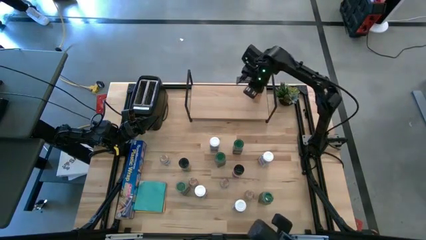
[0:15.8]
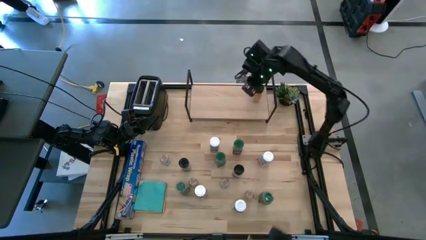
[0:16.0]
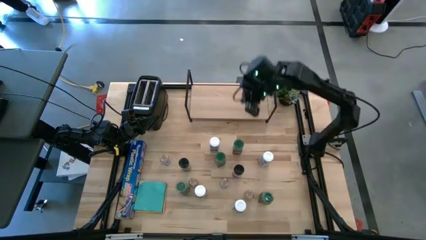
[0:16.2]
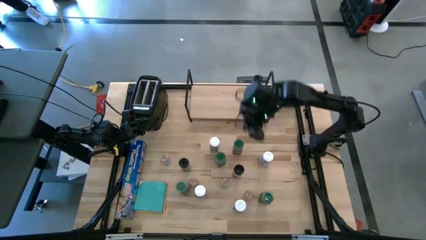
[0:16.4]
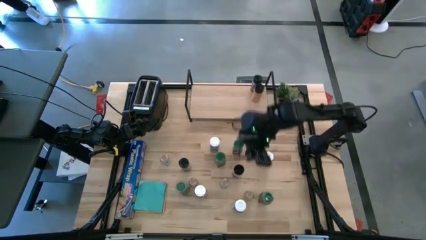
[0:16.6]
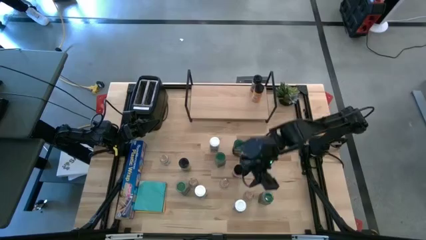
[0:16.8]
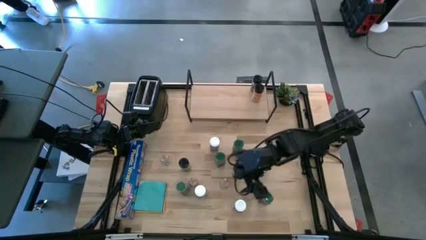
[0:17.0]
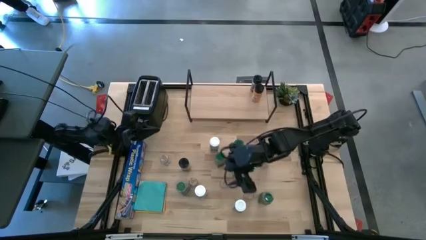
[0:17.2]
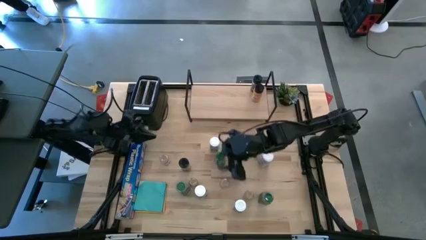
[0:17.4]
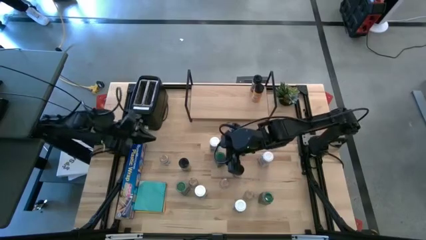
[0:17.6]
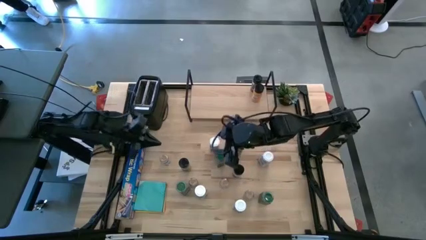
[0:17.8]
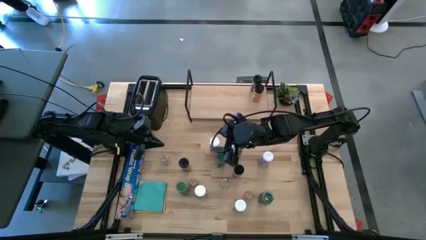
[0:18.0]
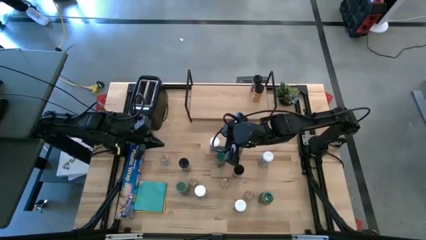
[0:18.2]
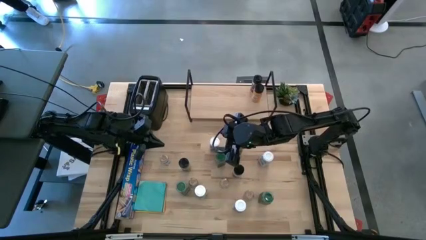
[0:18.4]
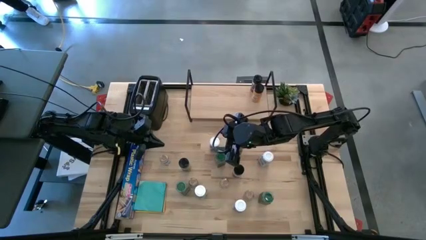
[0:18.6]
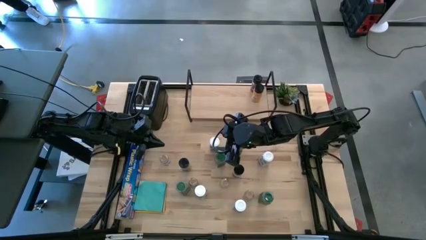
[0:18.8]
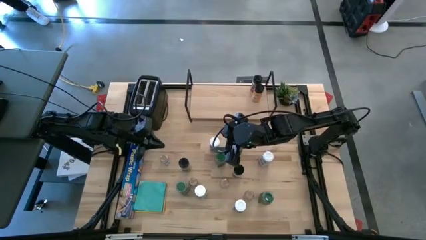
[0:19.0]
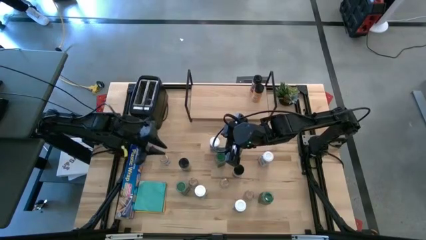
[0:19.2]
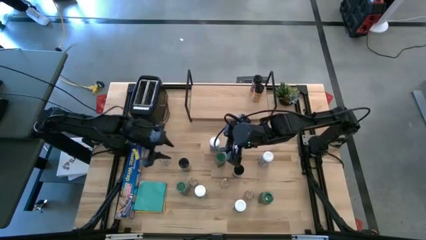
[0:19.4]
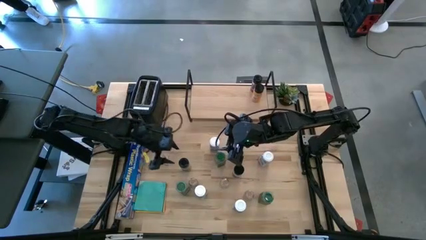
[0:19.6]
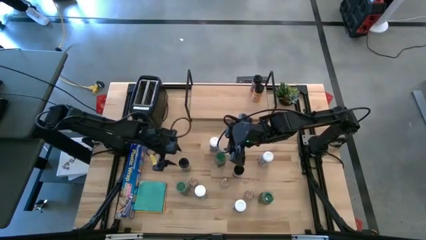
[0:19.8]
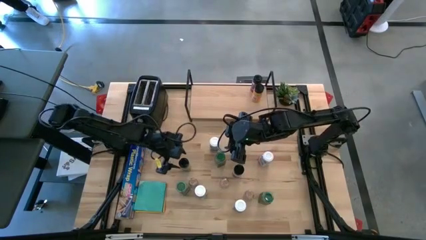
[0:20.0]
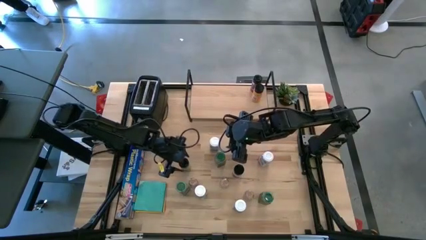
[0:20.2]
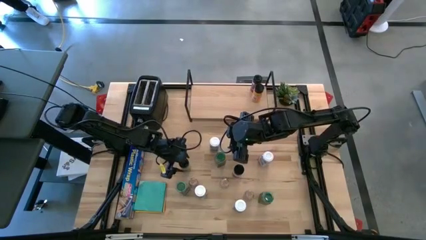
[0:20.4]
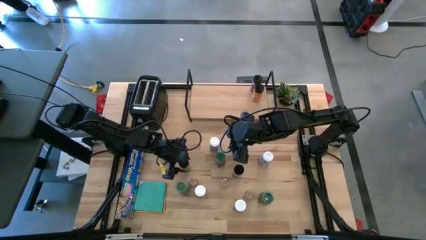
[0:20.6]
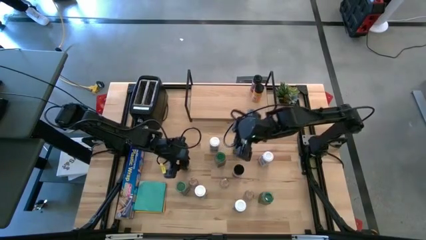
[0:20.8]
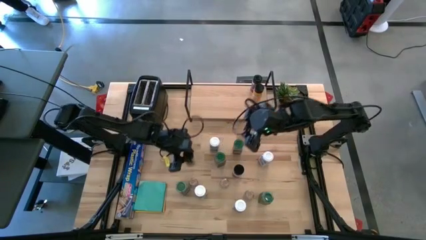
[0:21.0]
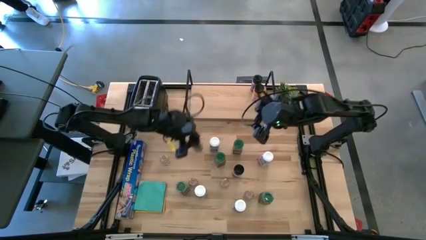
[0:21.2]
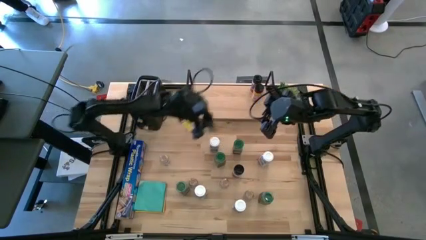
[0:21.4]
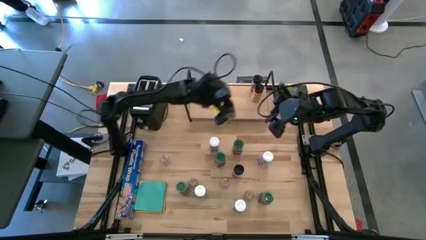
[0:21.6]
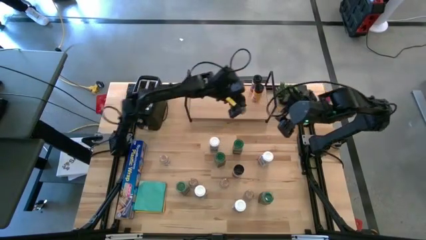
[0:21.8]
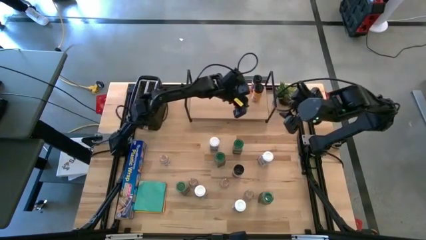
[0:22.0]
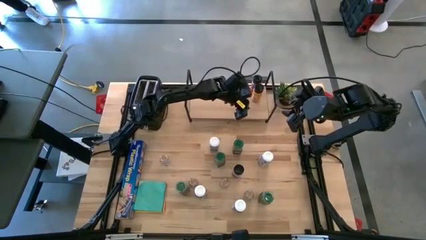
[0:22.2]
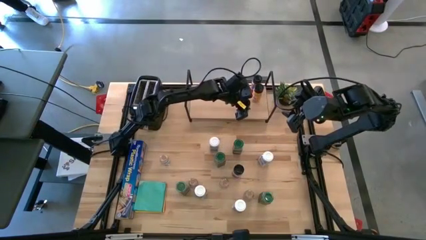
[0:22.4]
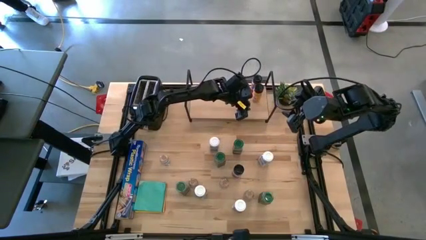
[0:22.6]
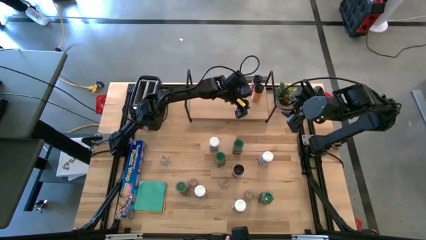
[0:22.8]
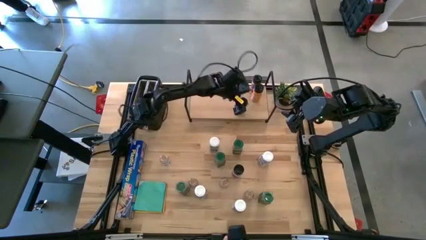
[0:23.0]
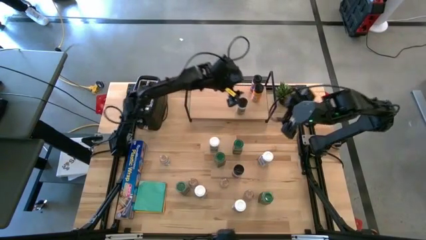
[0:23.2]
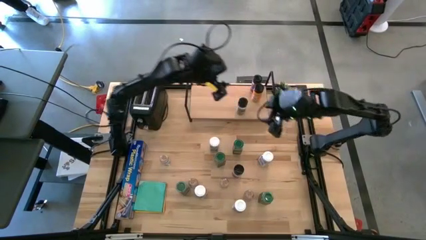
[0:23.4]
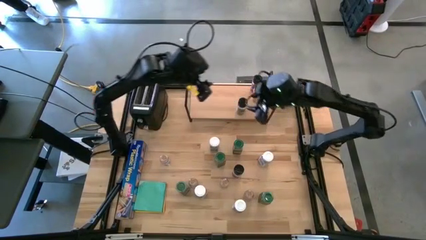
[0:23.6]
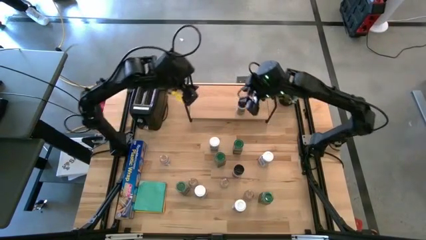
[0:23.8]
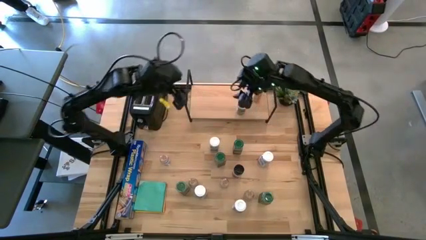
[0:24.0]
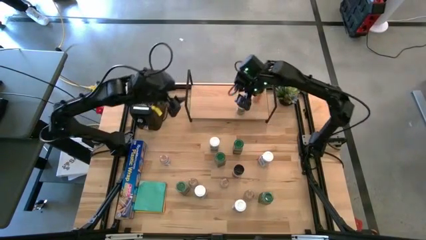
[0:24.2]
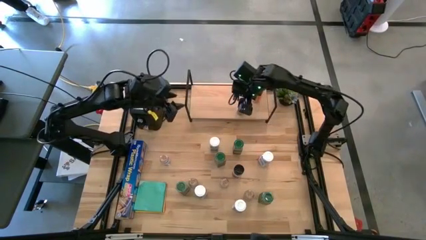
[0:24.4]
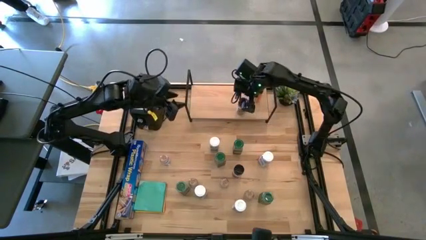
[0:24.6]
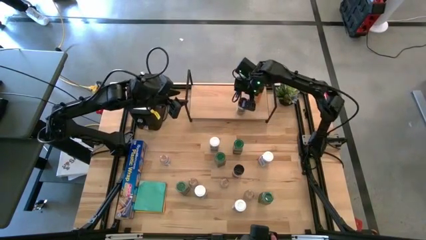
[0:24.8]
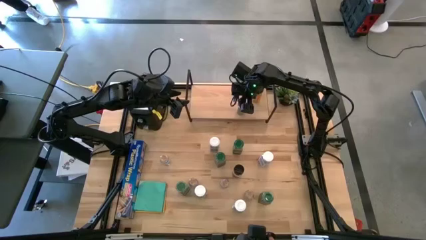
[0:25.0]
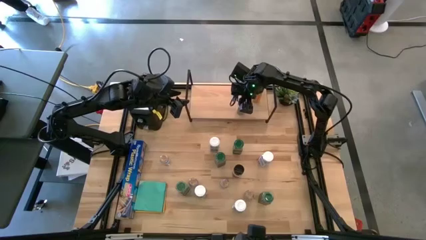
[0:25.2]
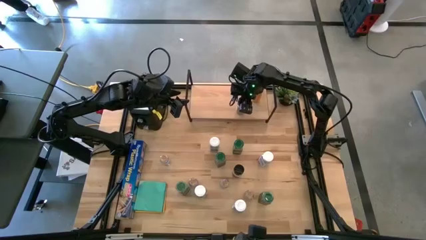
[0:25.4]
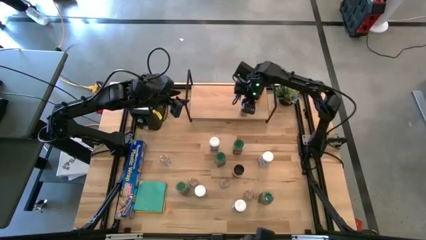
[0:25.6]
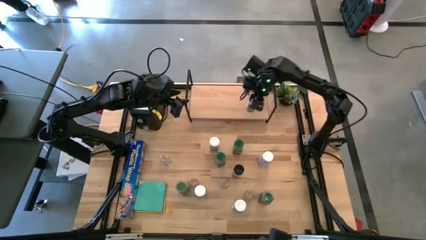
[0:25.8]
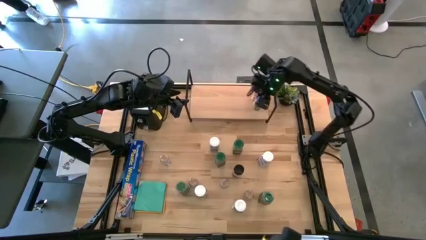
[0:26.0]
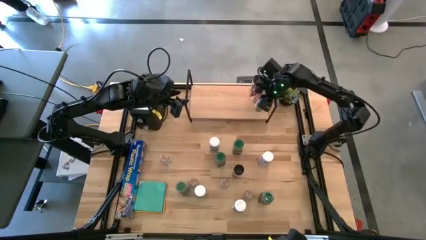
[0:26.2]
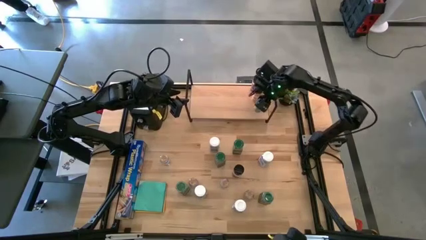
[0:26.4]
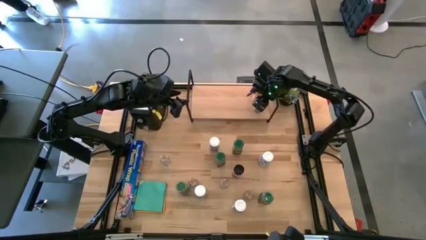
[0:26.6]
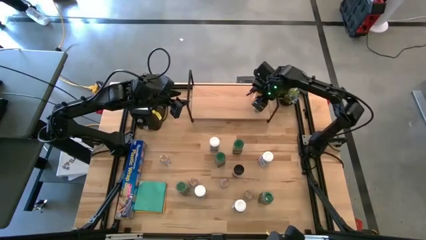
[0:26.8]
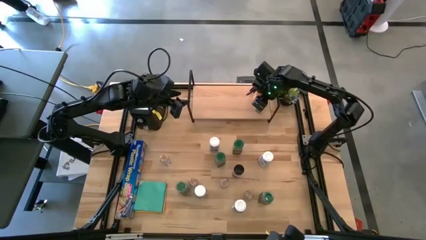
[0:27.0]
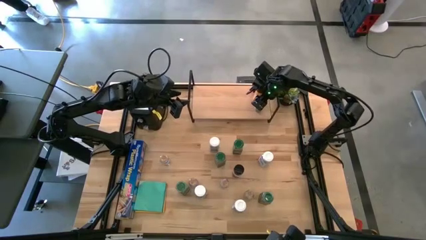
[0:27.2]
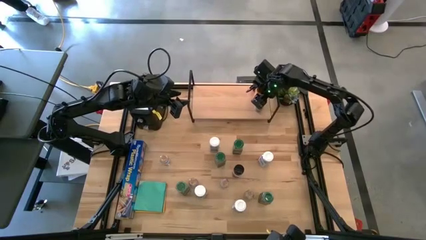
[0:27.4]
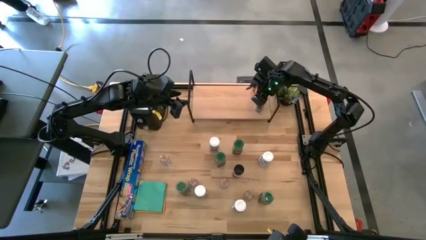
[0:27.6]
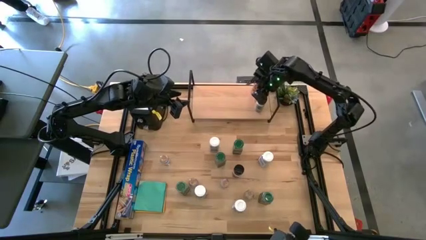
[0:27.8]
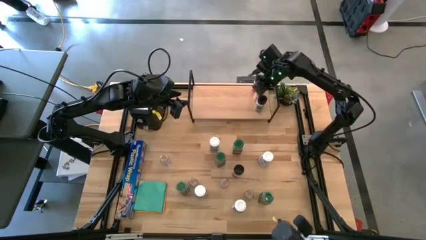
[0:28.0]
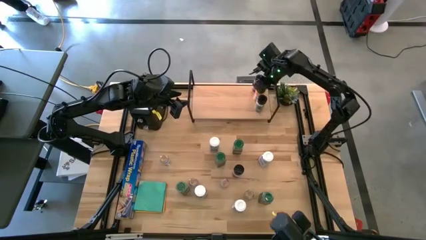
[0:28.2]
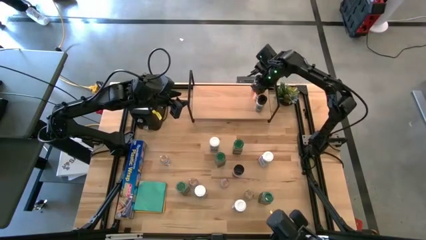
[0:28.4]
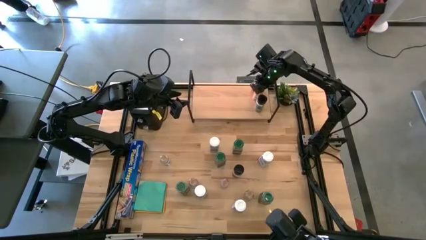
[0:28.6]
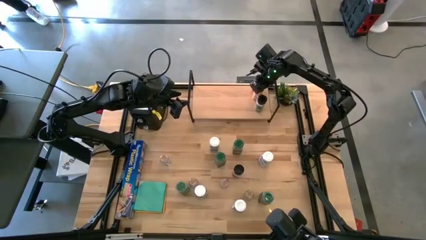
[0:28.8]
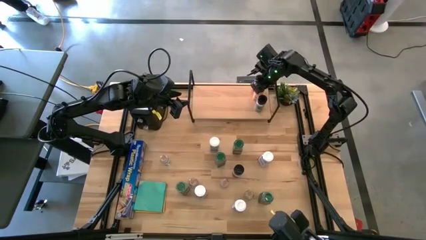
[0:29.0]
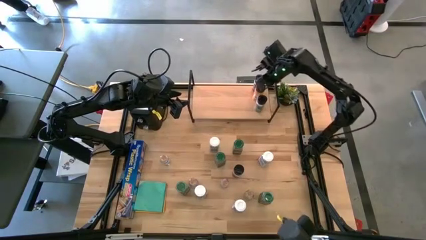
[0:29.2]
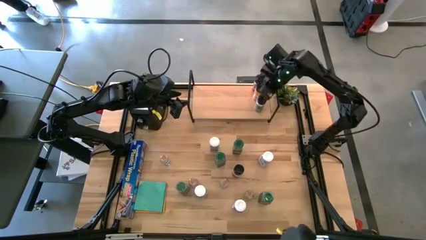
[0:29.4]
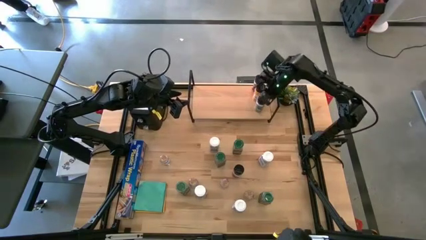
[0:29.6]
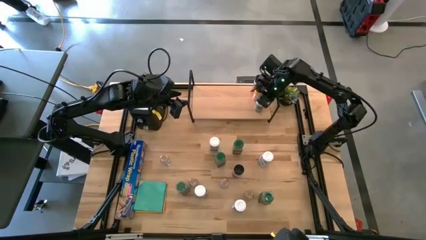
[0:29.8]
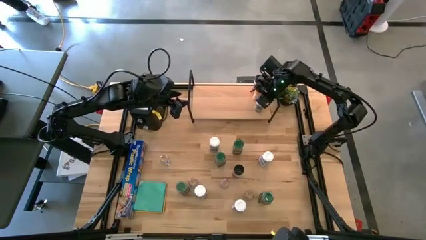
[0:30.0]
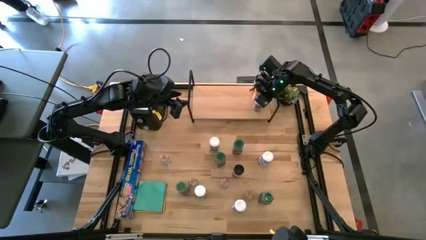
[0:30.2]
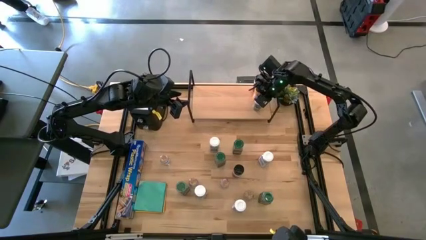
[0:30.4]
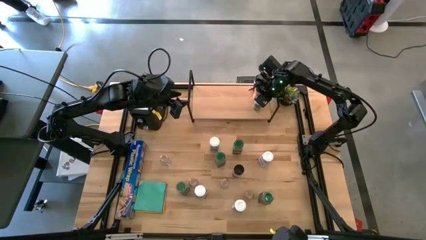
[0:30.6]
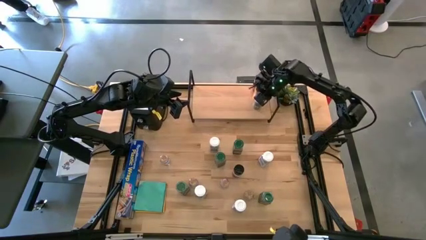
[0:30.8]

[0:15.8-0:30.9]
Task: Shelf spices
Put the left black spice bottle on the shelf and align with the other black spice bottles
